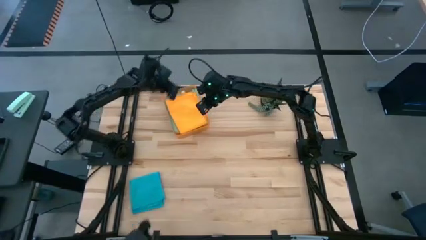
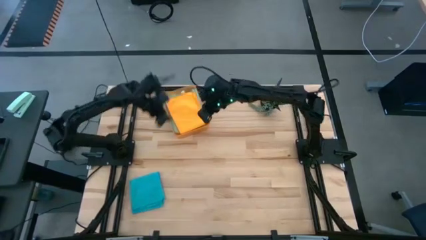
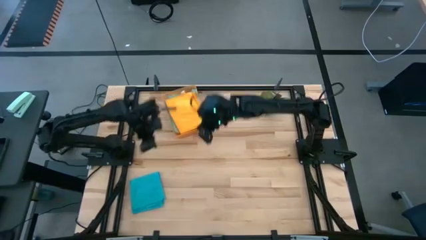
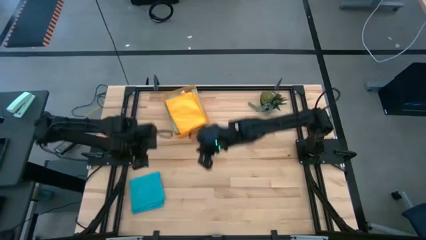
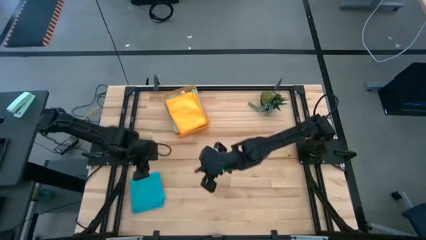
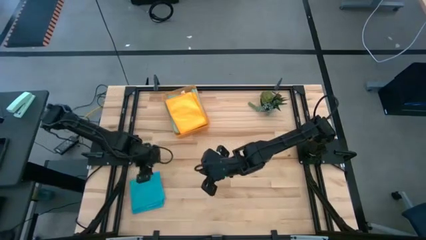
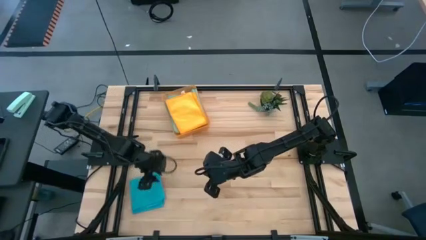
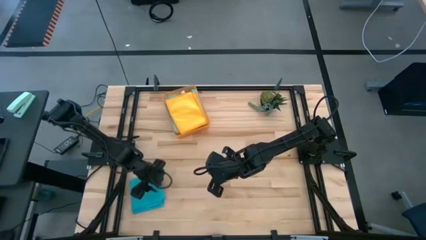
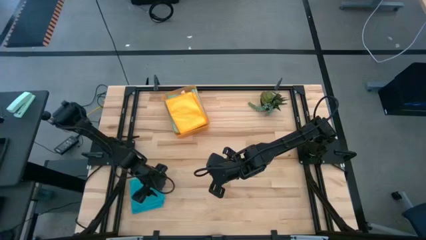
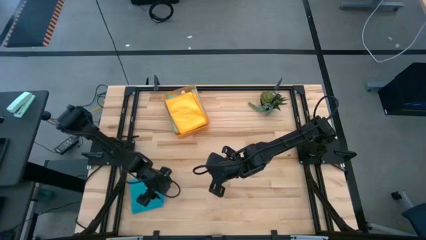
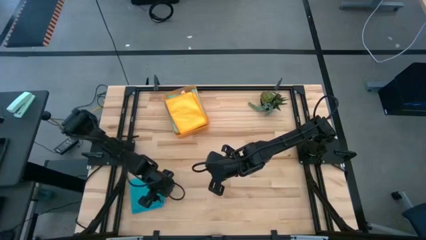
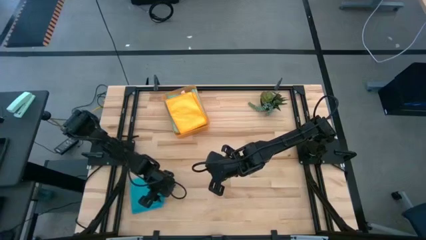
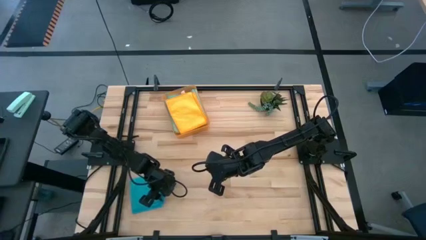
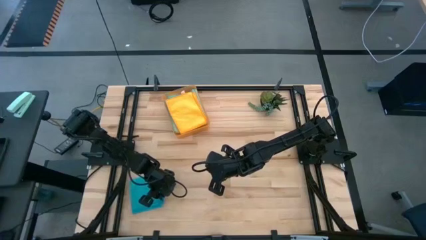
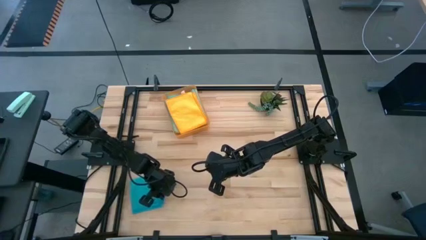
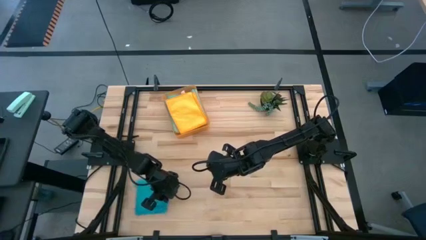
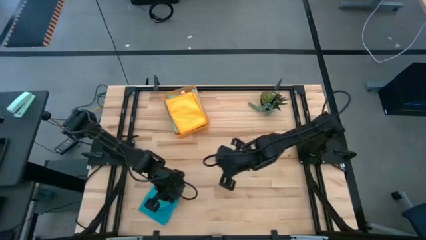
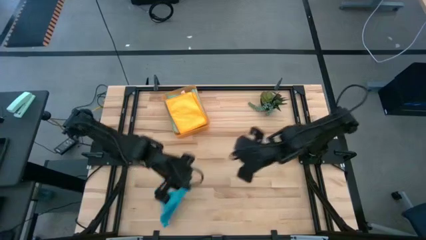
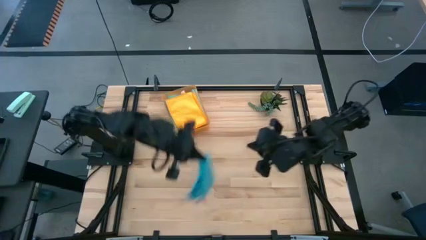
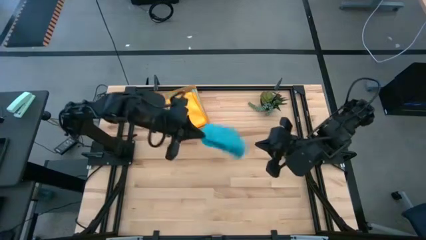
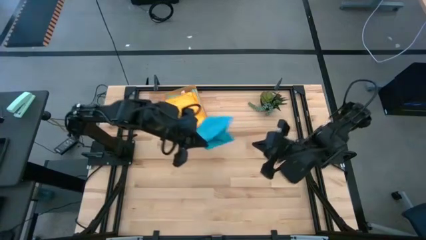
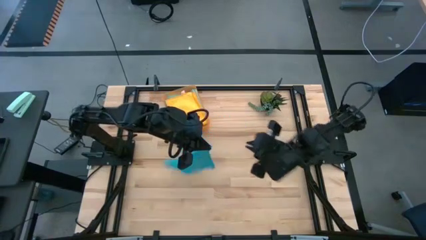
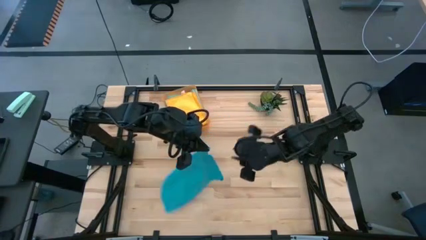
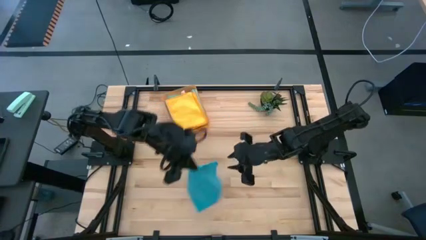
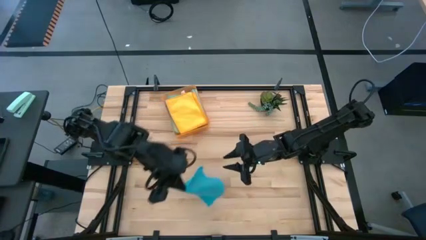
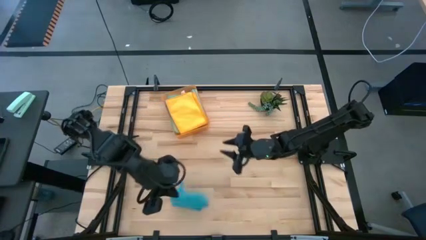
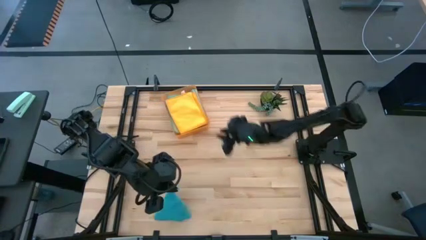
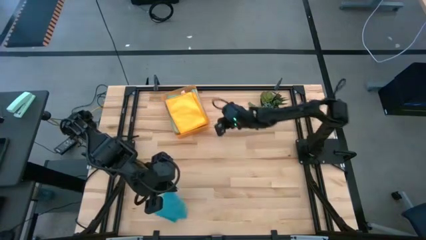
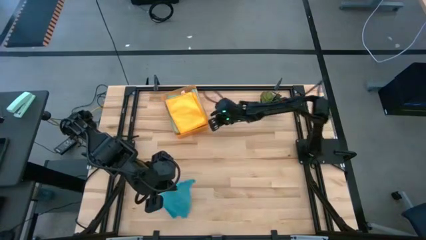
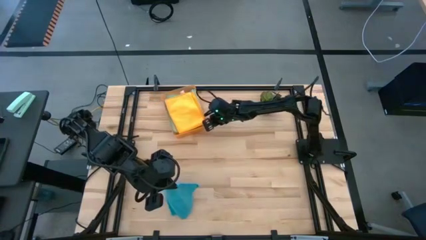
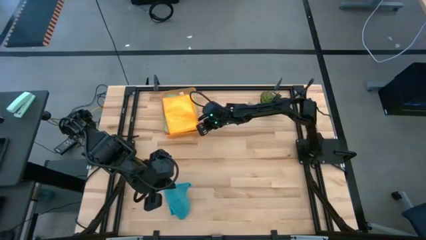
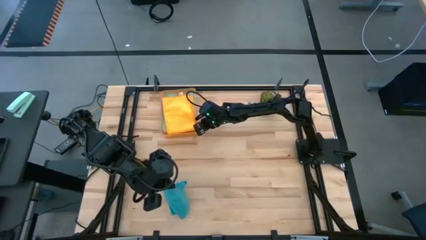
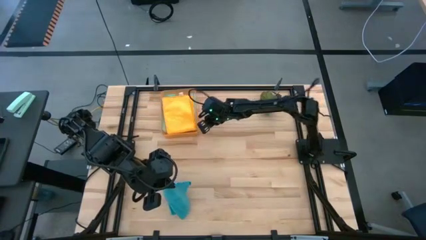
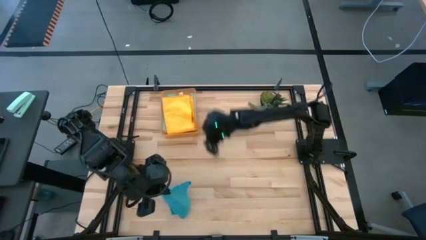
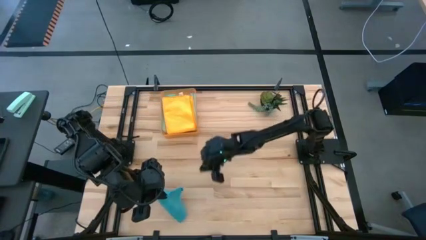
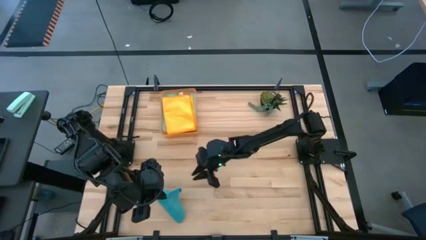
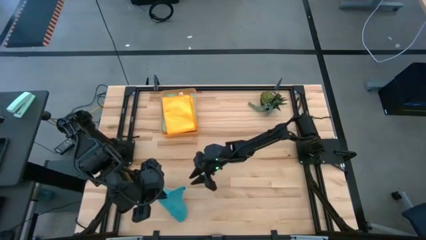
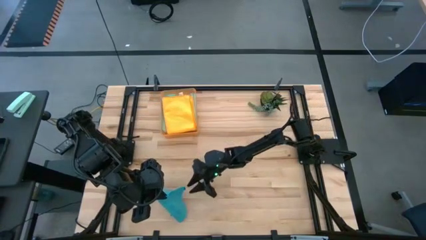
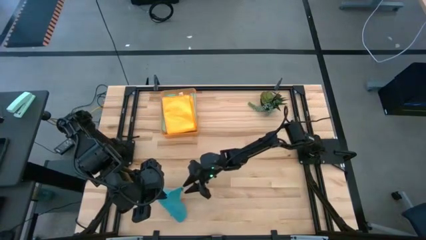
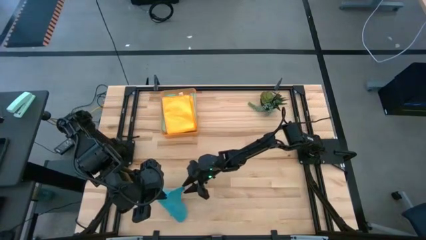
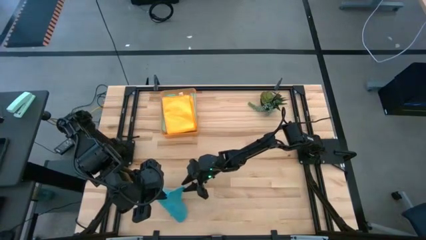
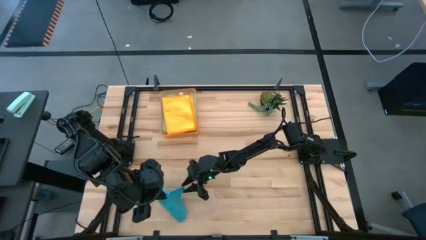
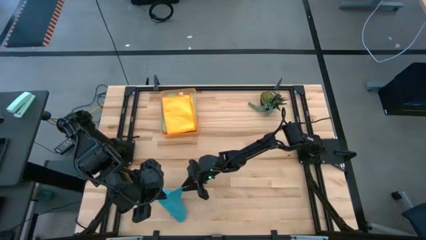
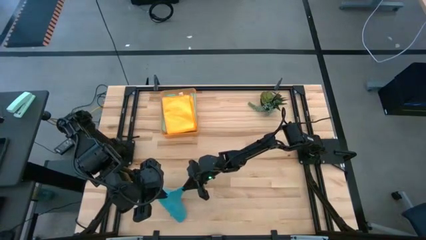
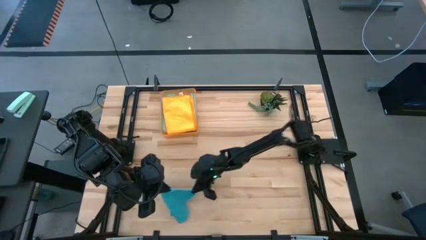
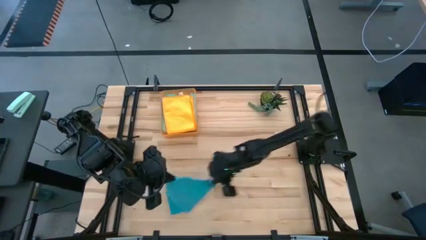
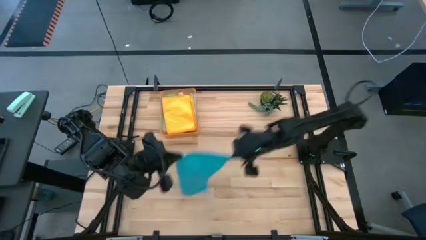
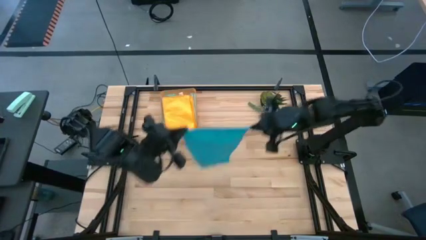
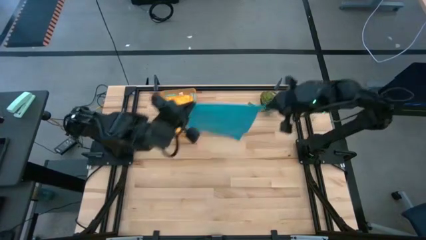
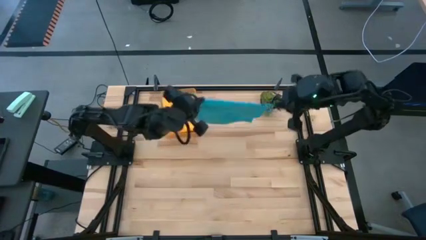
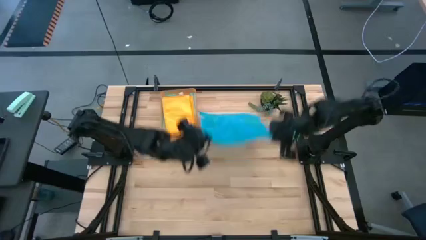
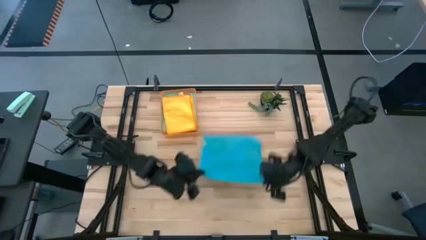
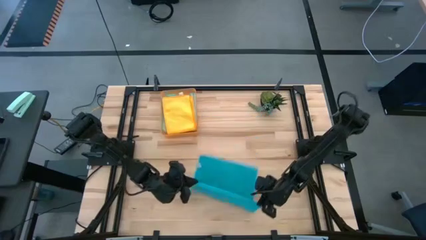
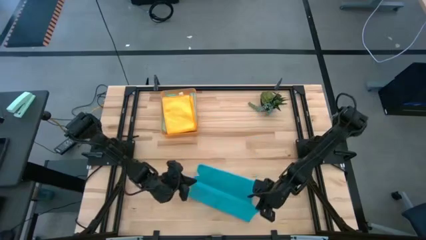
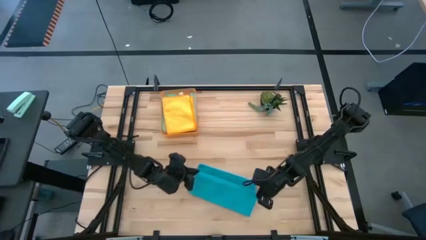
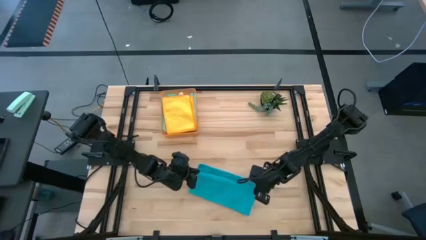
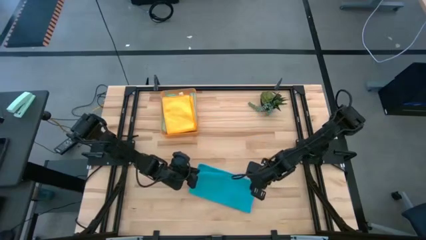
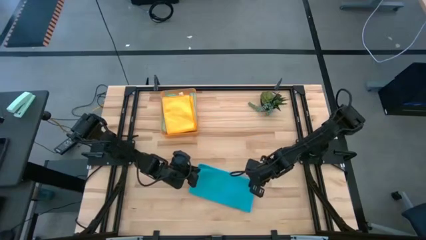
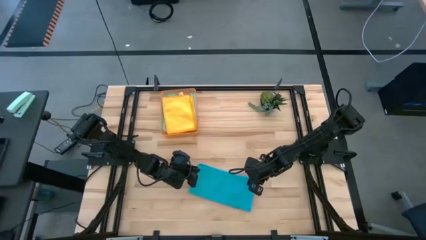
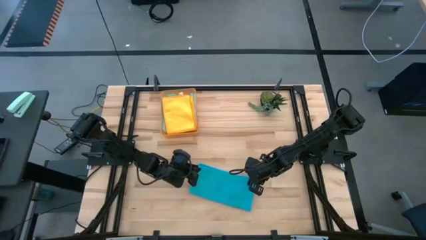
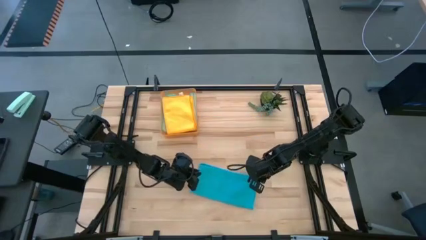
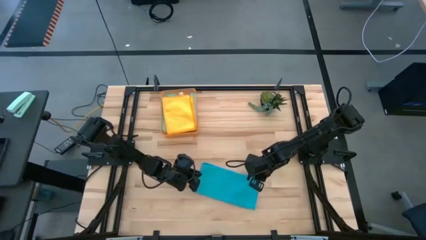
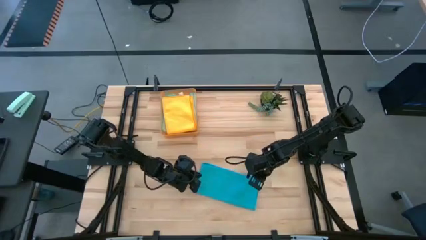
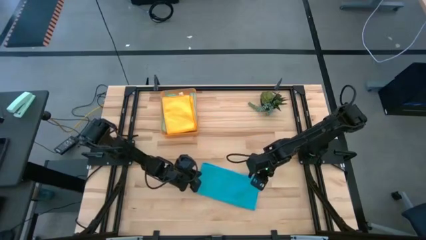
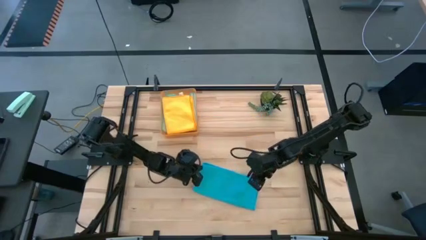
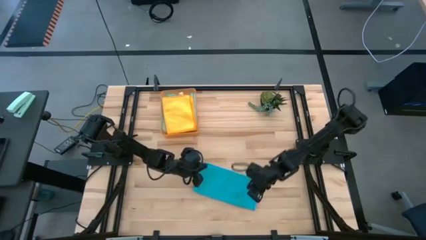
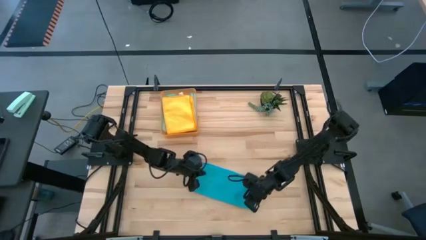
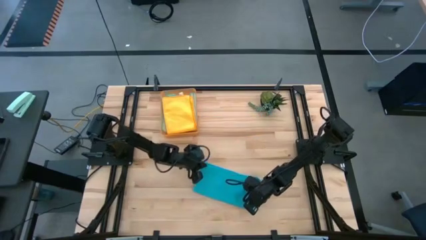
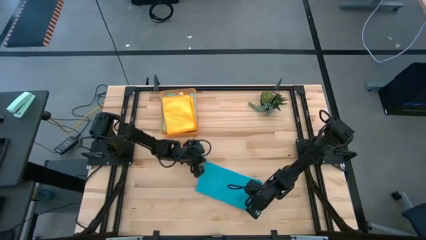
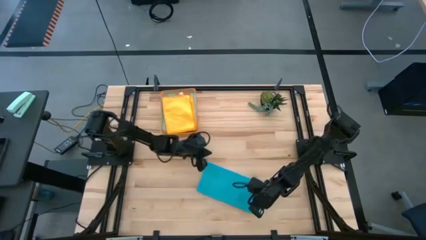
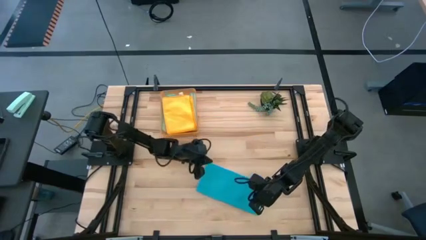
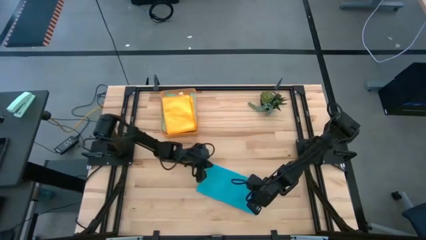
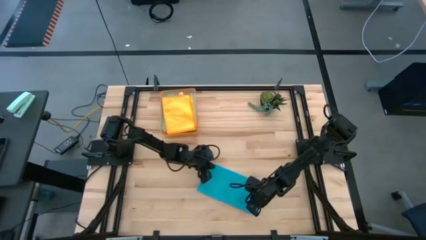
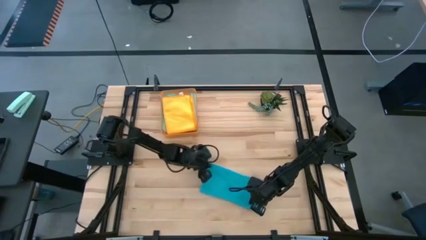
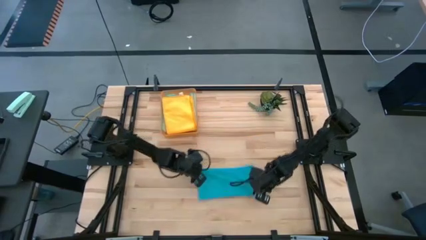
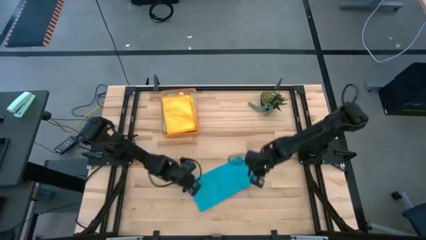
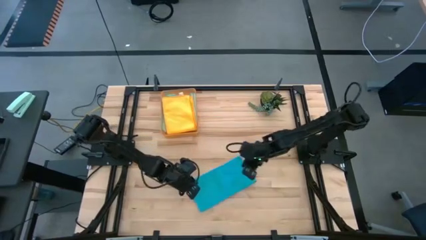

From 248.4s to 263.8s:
Task: Fold microfiber towels
Fold the blue microfiber cloth
